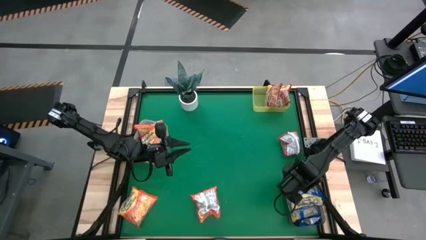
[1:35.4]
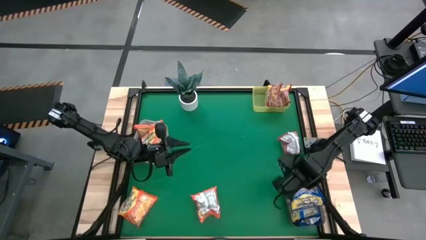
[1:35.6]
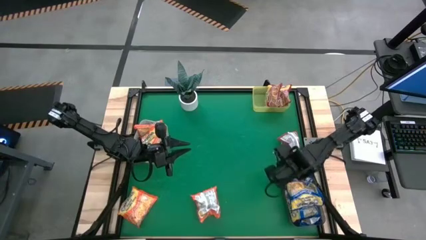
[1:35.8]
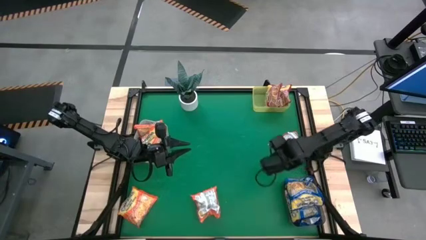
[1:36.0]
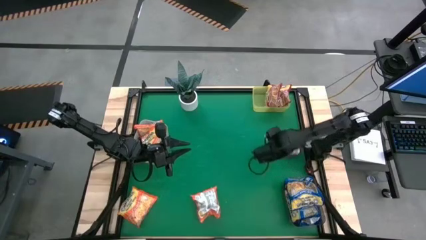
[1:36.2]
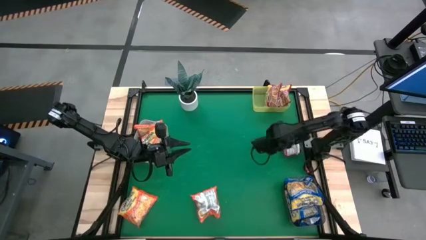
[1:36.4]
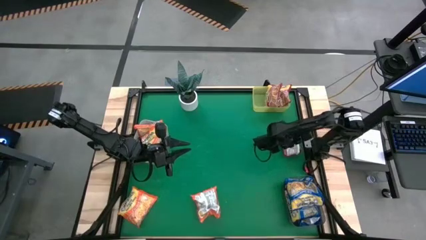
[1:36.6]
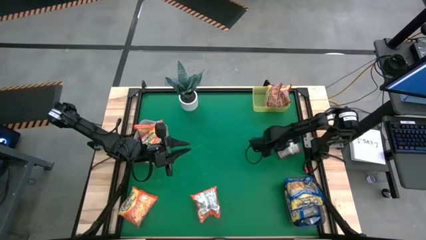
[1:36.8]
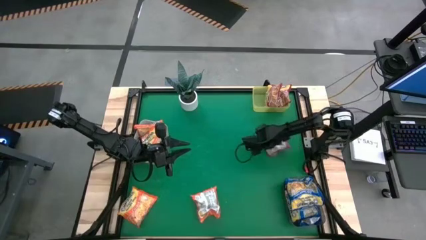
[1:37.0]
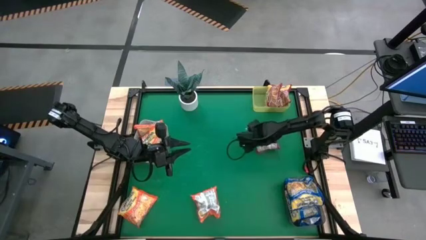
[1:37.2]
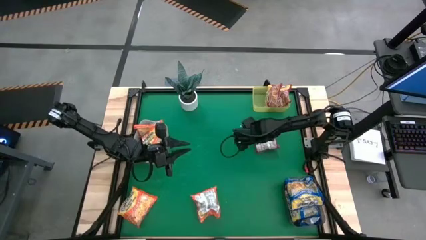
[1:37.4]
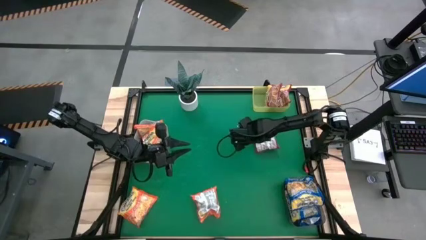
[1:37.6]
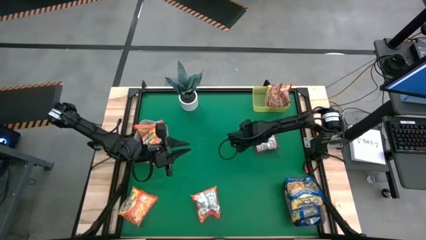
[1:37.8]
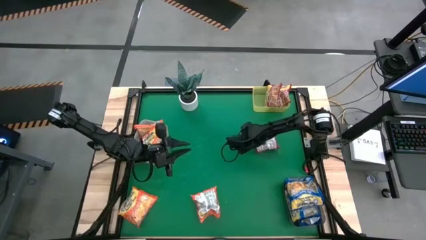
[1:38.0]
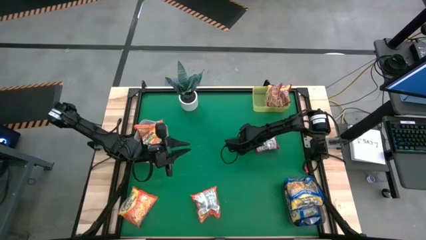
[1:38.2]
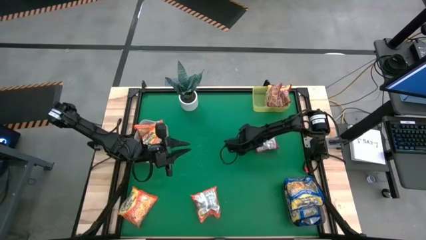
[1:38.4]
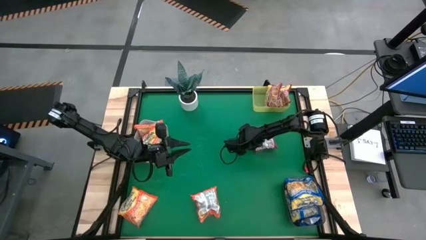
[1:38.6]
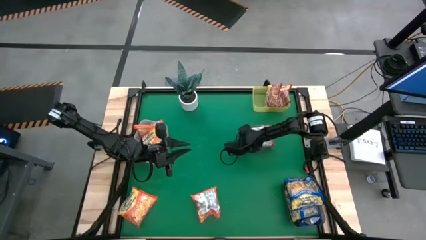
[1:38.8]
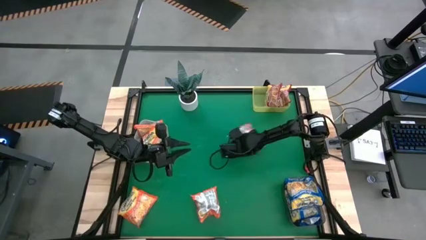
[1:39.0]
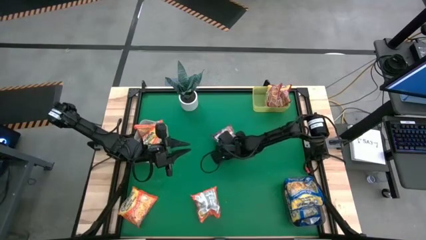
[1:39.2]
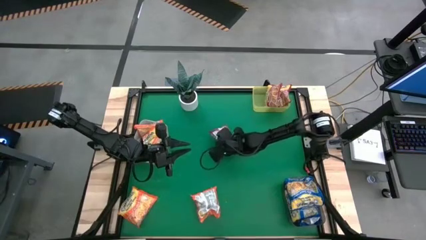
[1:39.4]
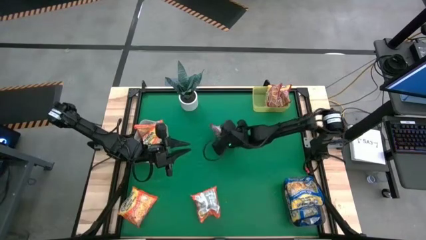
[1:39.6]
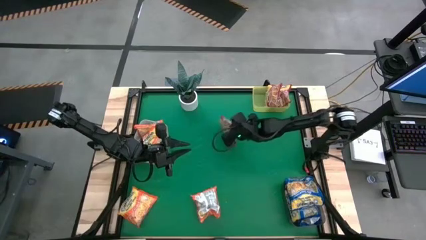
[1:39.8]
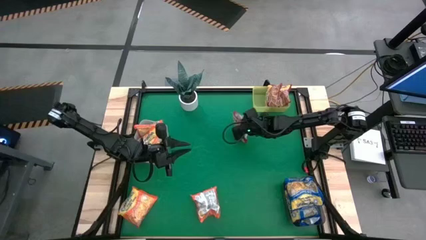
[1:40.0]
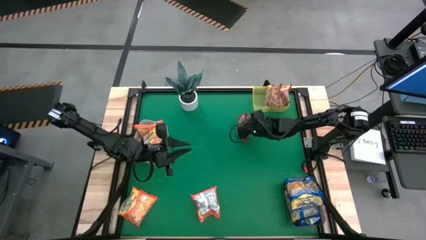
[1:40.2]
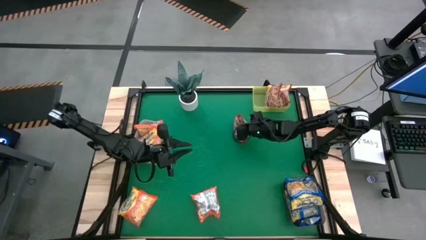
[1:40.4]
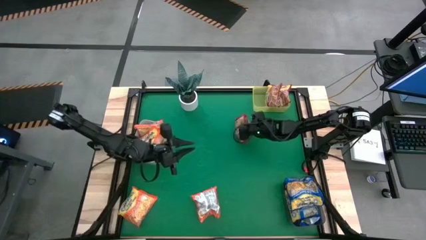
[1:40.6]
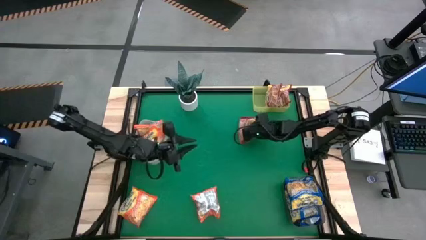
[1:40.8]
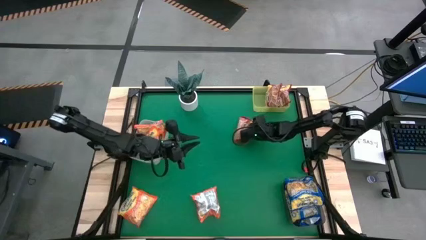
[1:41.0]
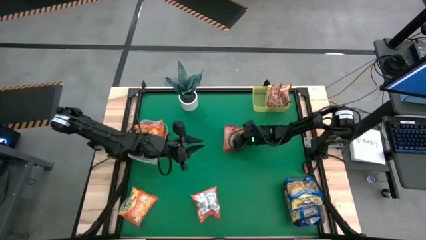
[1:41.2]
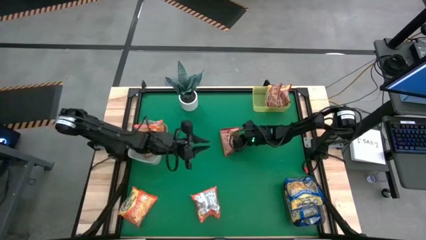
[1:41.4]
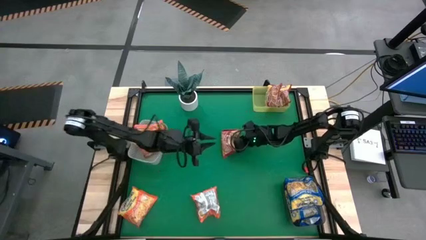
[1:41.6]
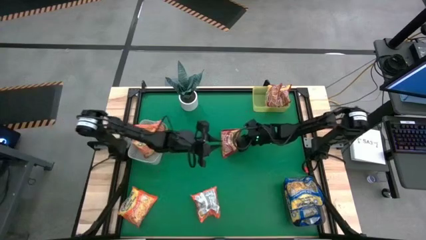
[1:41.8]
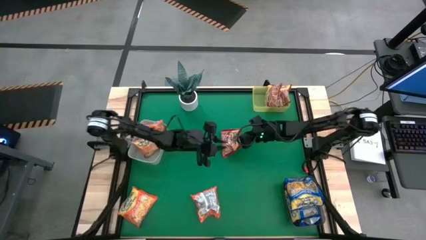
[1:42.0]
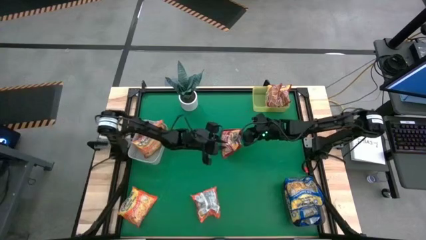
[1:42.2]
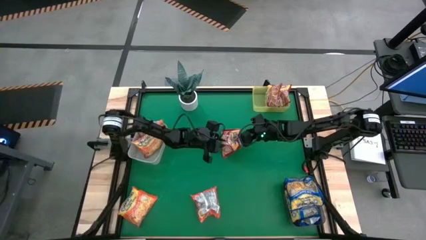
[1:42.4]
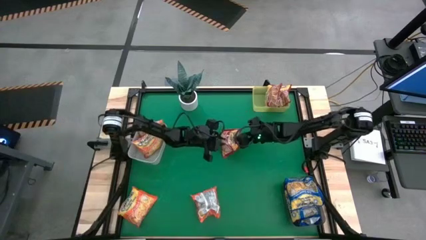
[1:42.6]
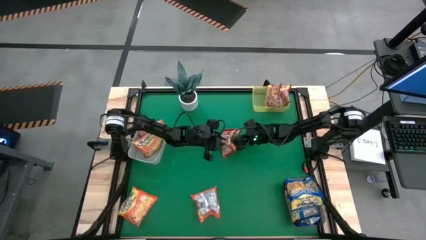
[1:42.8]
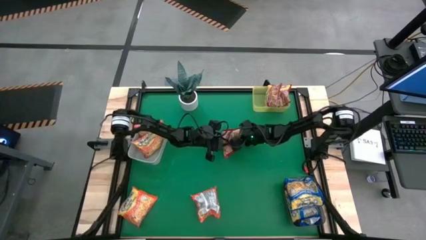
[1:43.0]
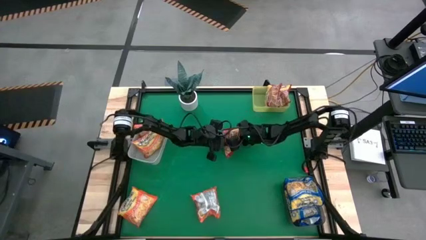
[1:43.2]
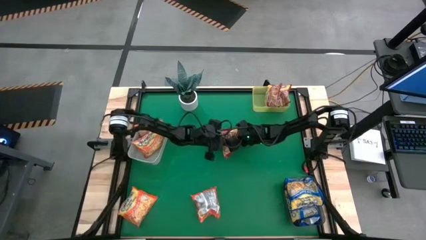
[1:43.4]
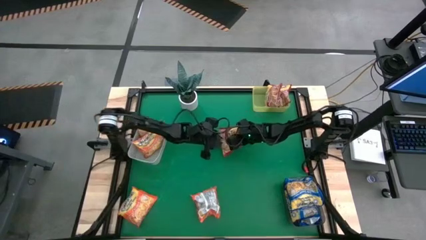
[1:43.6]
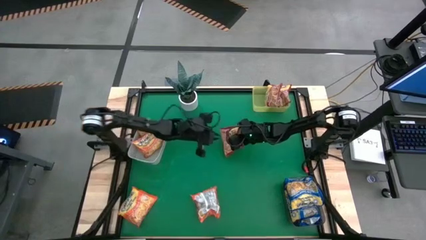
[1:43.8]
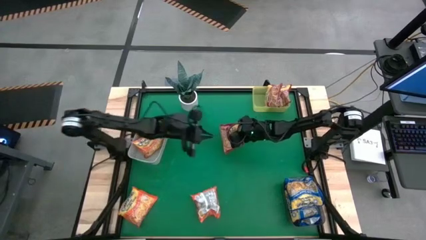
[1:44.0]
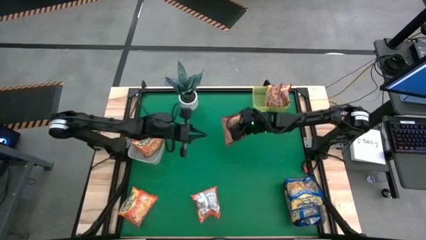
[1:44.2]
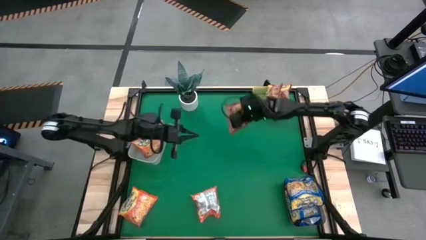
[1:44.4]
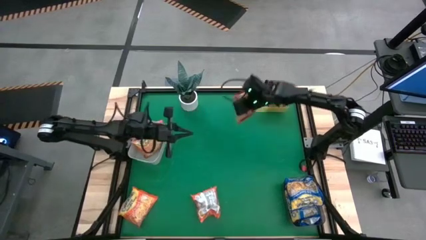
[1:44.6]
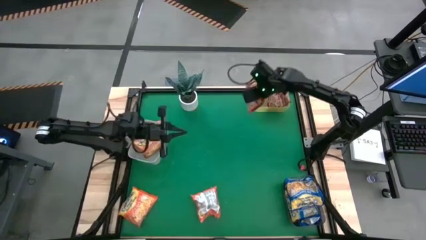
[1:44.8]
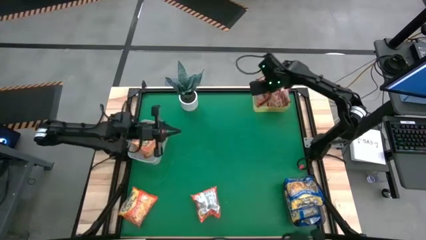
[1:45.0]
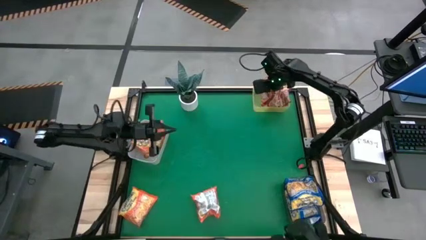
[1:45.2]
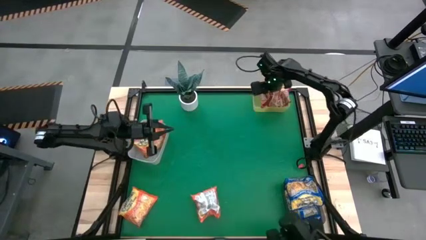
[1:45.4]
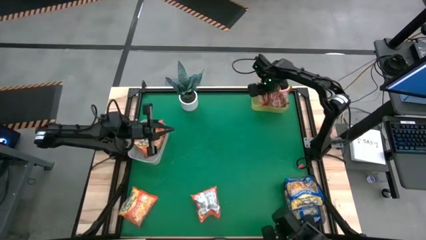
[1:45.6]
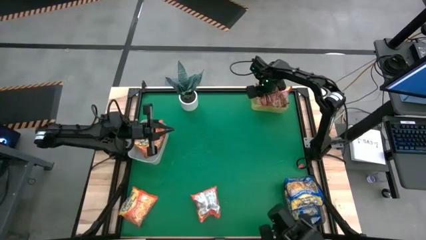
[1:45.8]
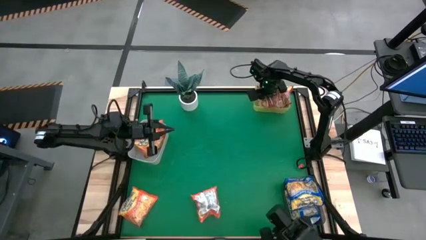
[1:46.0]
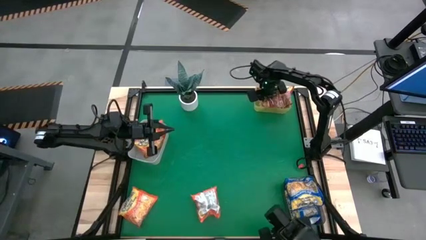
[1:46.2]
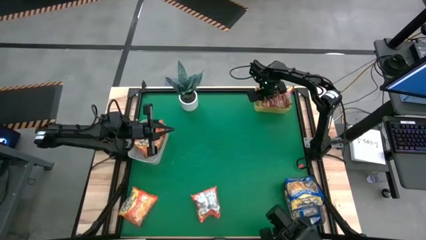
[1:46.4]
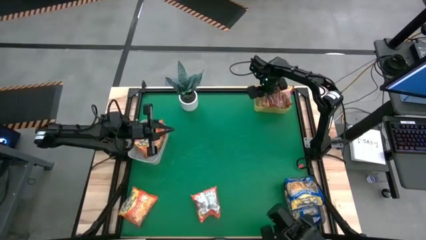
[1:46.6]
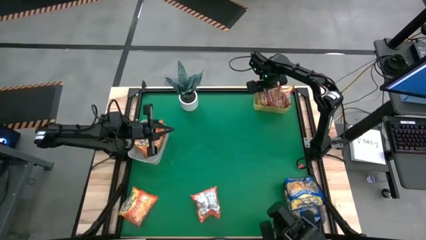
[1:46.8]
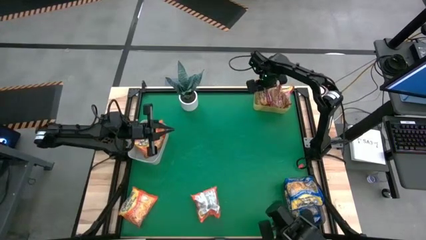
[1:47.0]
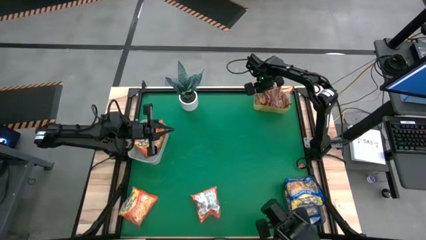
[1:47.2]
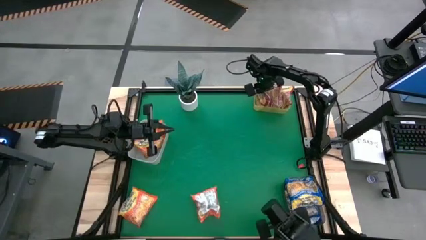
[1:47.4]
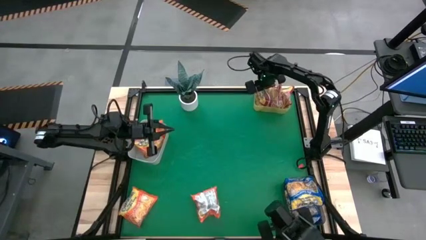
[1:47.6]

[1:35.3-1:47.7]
Task: Sort Maruchan noodles
Put the red noodle pack into the yellow bin

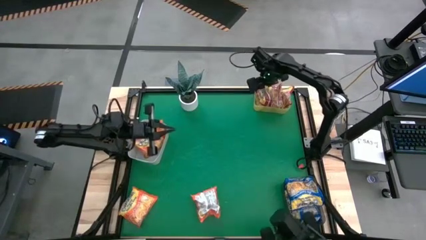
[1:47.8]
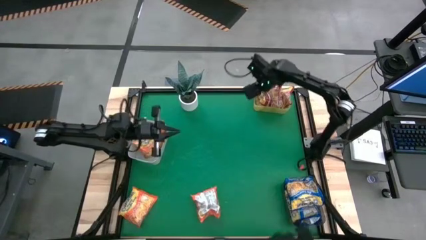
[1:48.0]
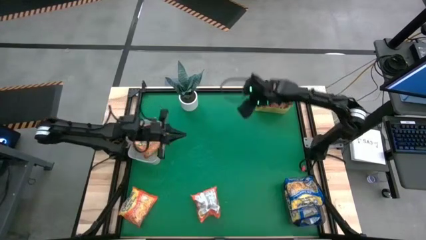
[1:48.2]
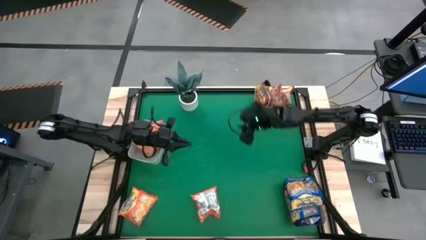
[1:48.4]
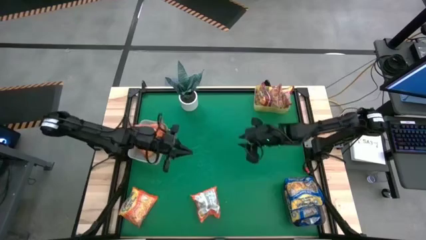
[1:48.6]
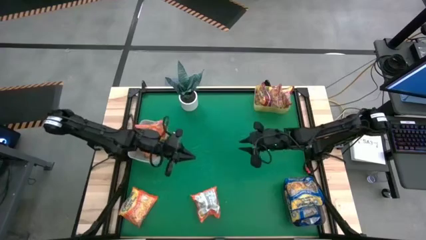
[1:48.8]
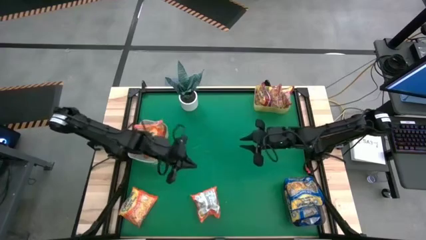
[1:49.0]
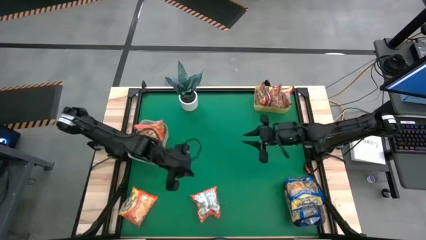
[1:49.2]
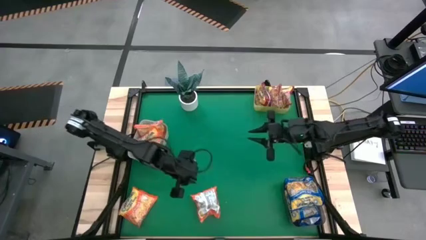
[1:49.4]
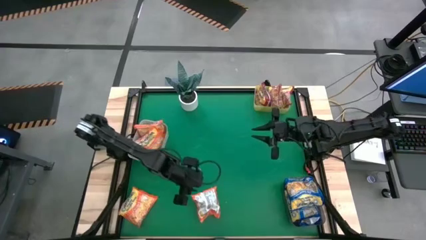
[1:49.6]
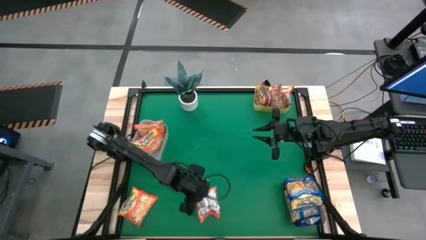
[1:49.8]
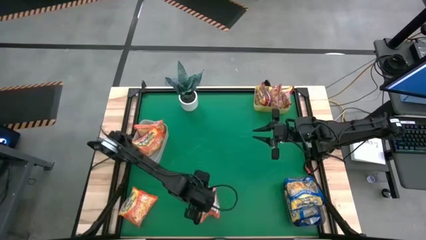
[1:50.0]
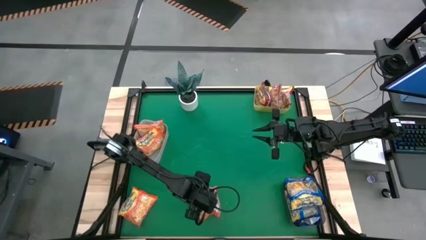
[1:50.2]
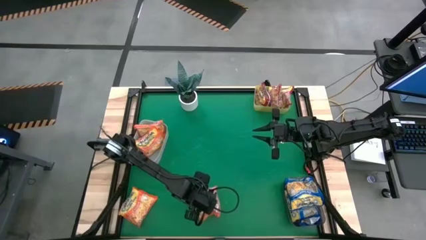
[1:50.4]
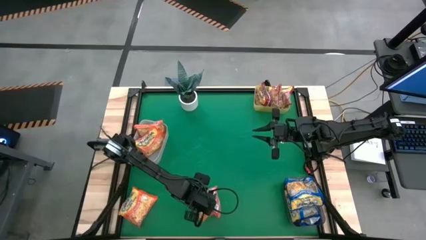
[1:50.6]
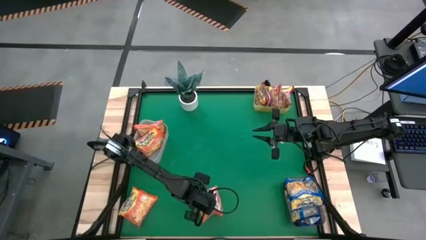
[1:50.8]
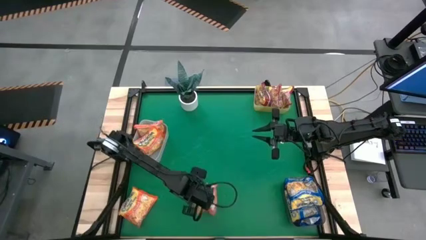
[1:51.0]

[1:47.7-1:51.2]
Put the orange noodle pack into the white bin

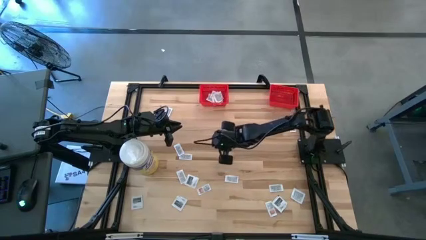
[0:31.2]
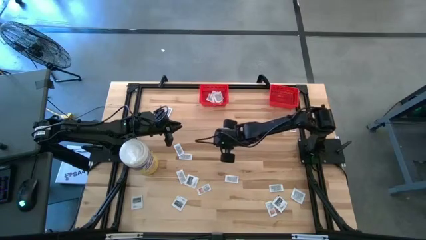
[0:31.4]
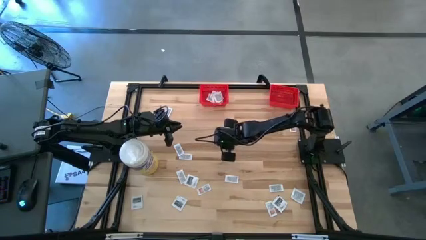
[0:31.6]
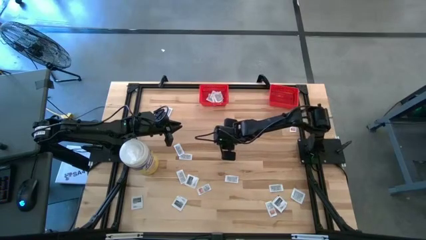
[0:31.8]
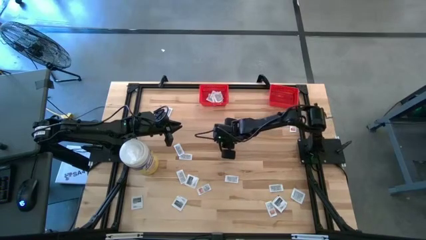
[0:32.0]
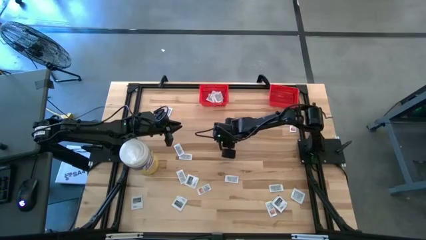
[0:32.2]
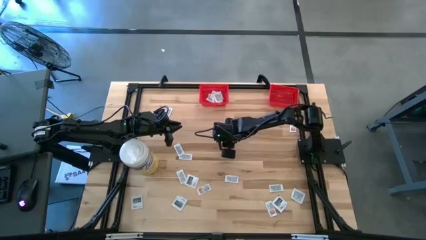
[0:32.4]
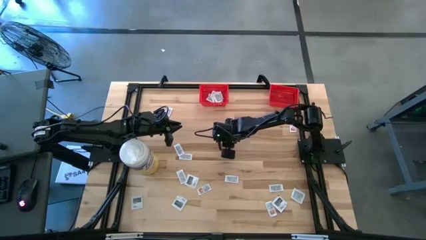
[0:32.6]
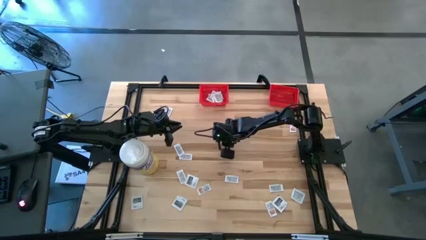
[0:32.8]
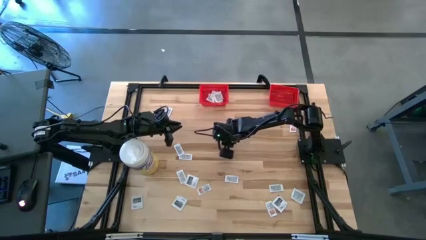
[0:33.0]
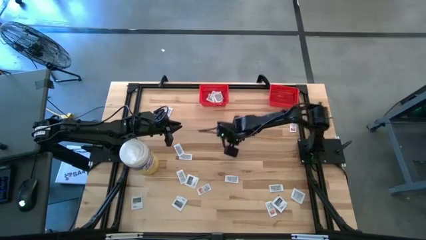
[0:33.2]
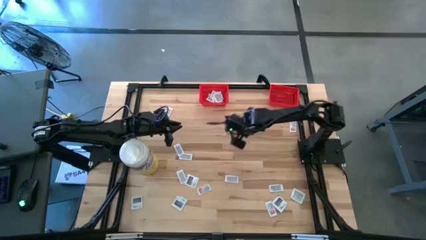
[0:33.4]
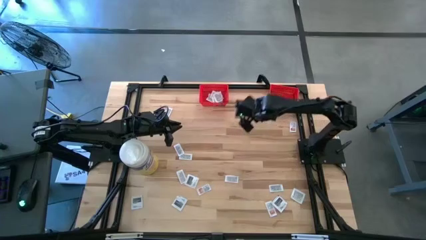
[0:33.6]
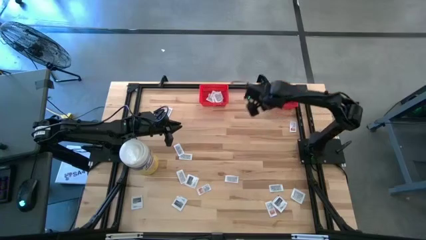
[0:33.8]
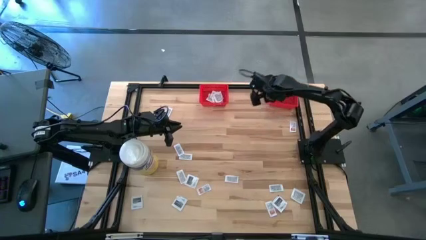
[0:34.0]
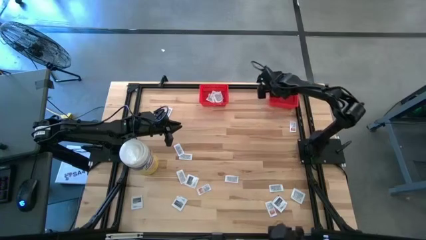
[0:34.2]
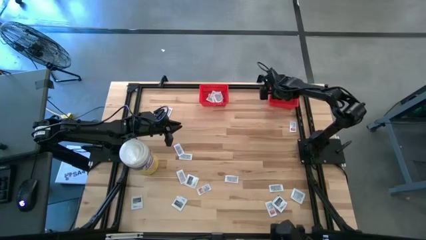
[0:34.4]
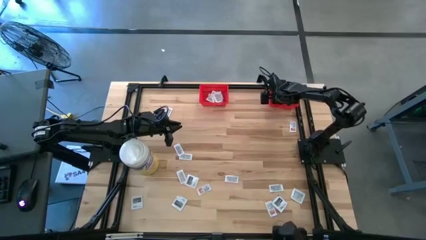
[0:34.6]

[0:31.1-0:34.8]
Task: Pick & Place First Aid Supplies
Put the ointment pack into the right red bin
